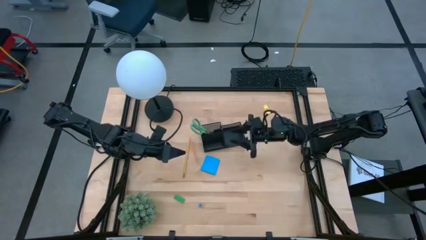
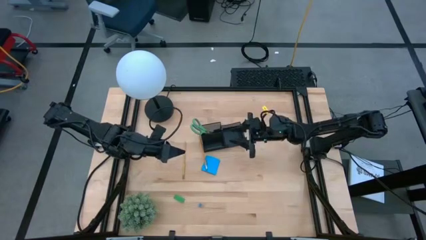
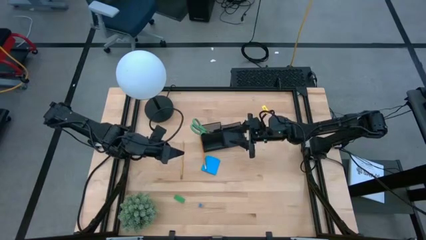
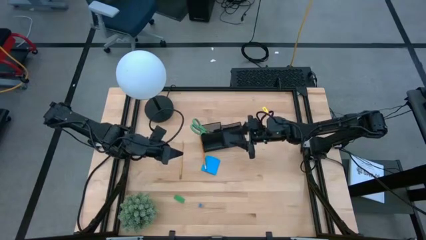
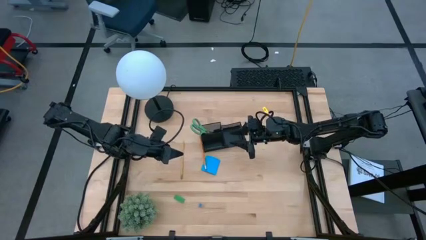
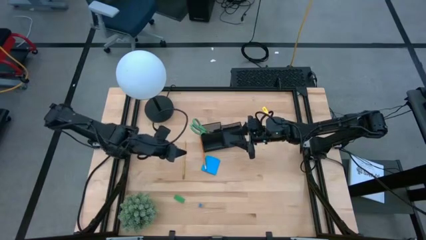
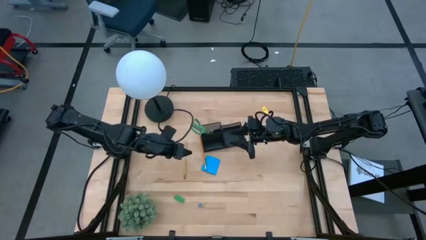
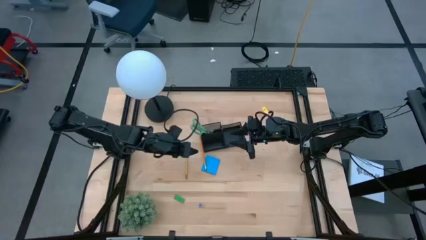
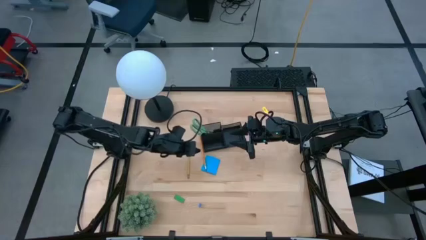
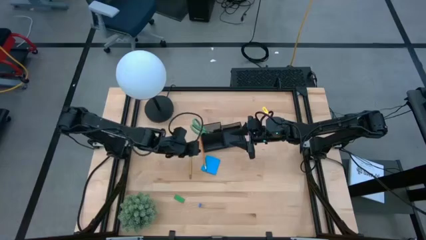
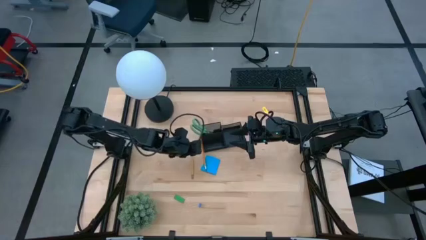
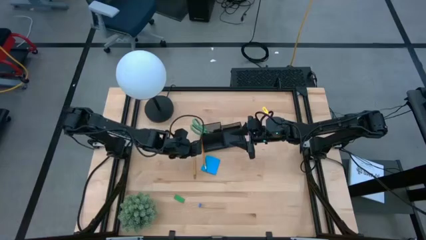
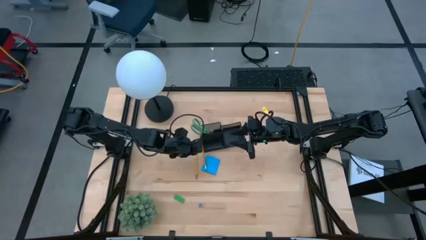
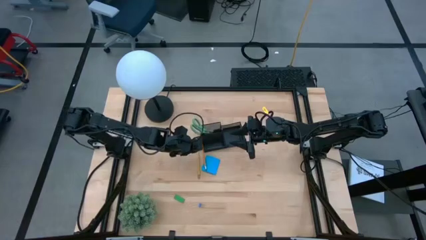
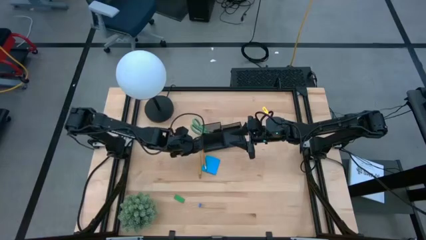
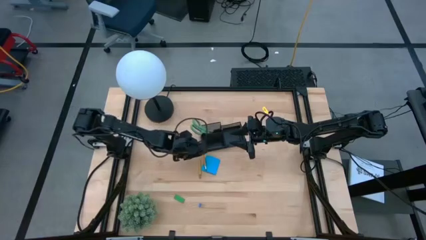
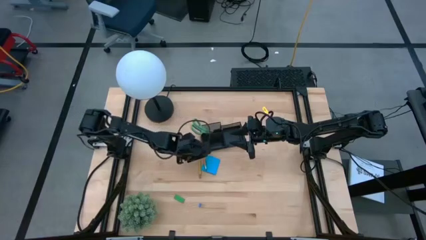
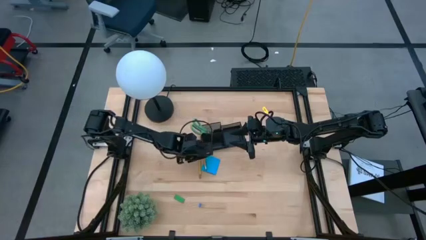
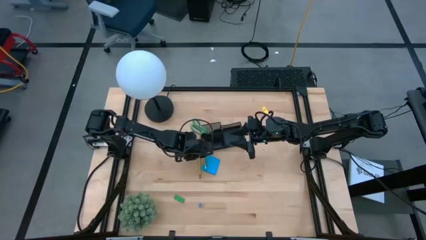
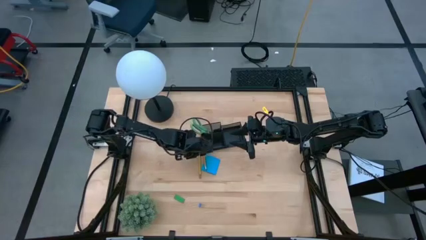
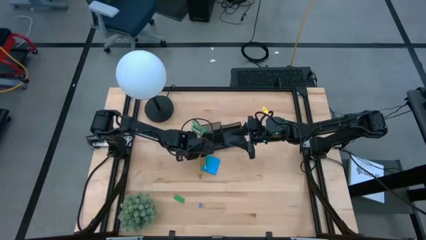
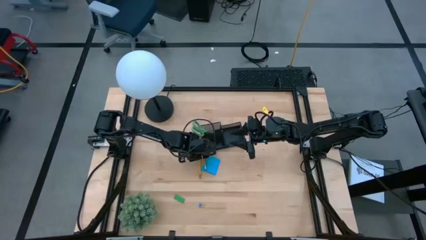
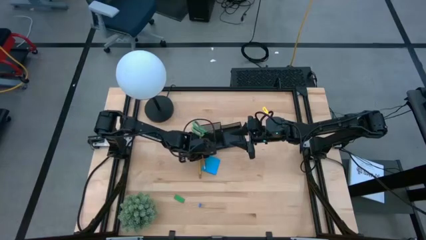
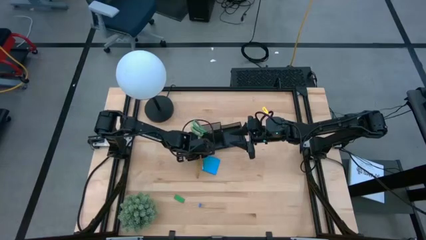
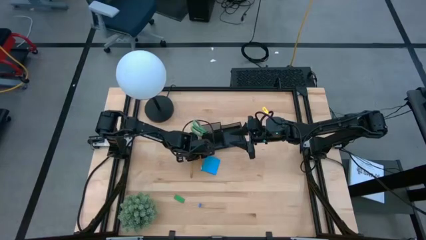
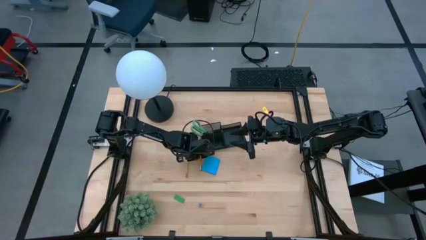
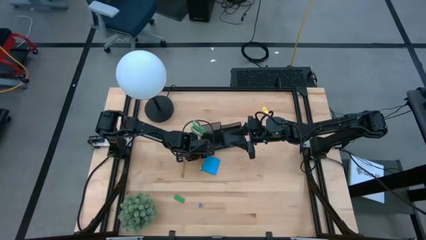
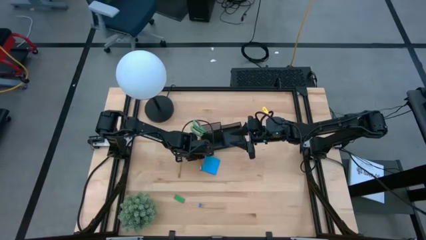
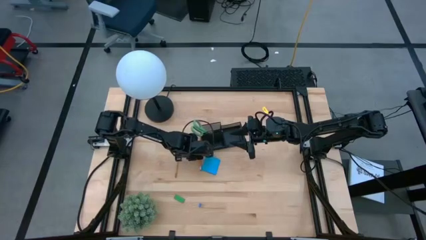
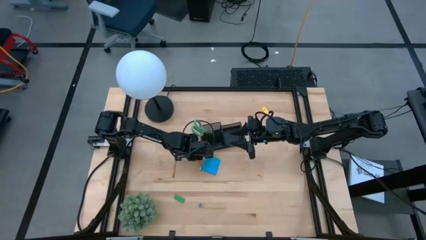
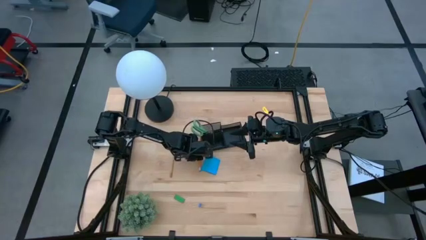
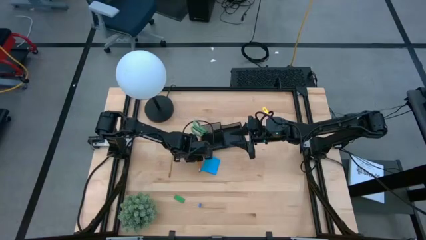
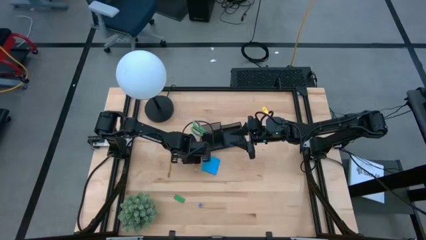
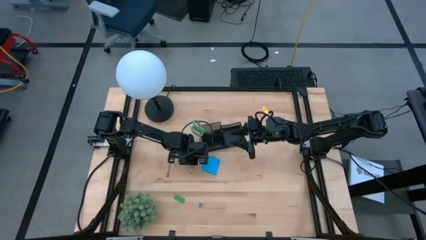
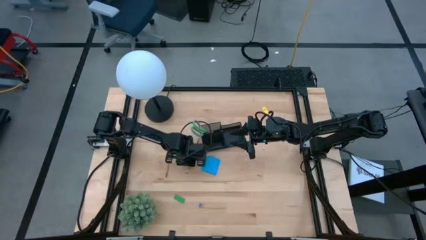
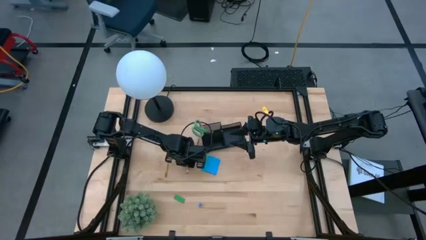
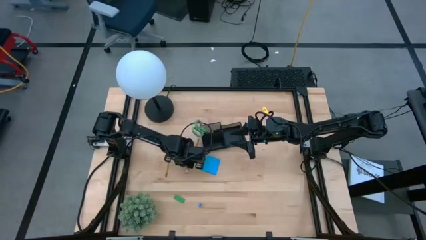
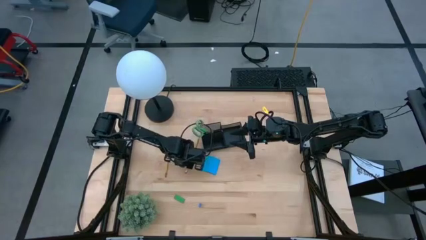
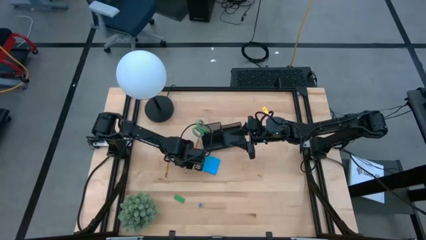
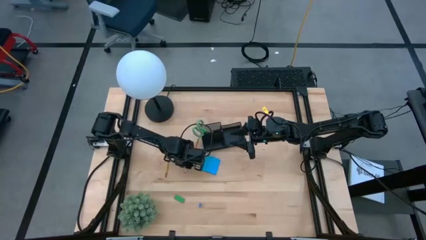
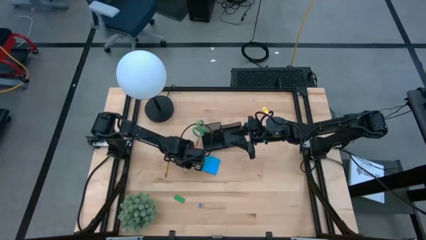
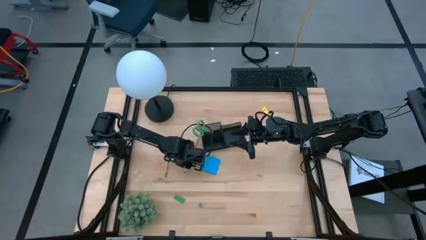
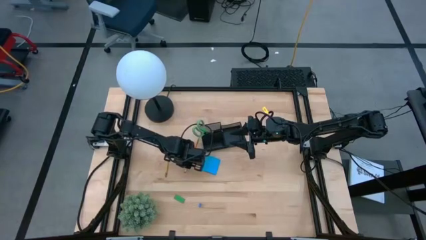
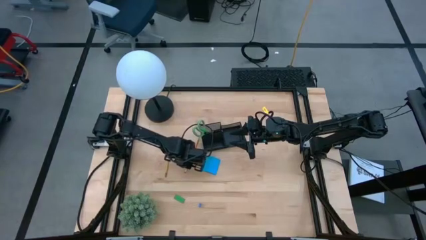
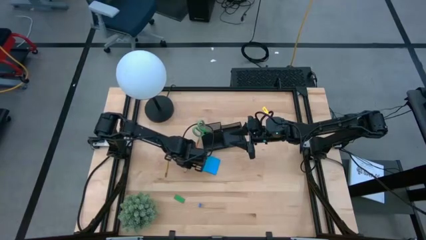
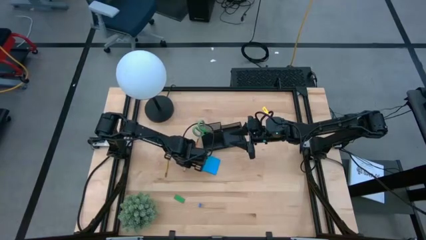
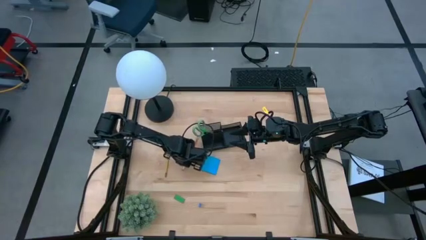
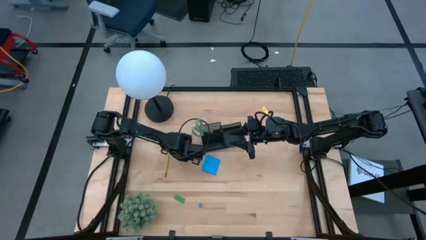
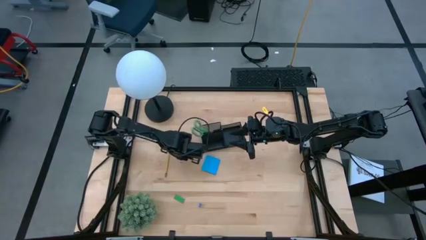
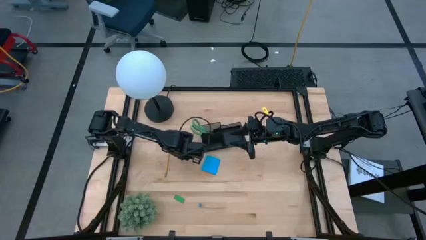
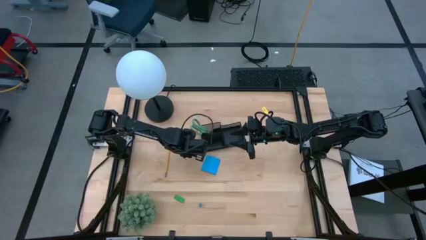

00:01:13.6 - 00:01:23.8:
Task: Pick and place office supplies into organizer
Put the orange pencil into the black desk organizer

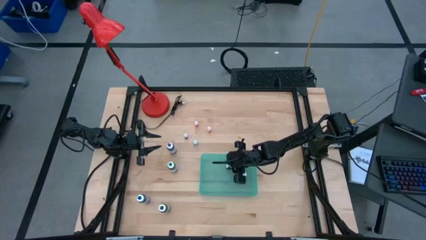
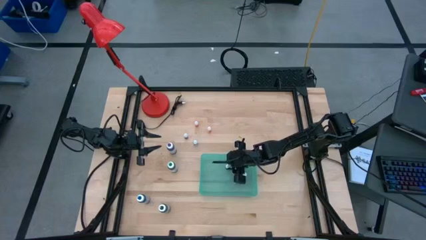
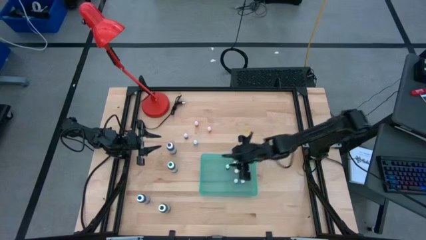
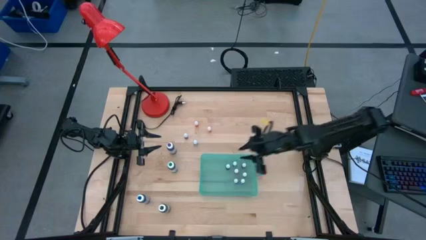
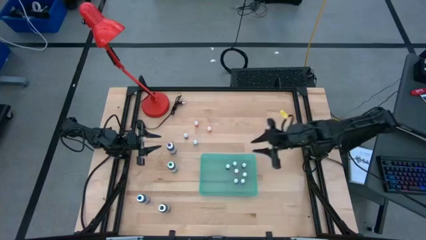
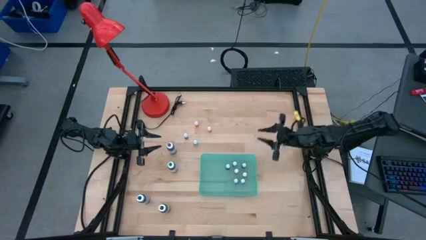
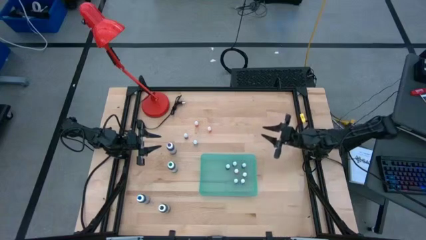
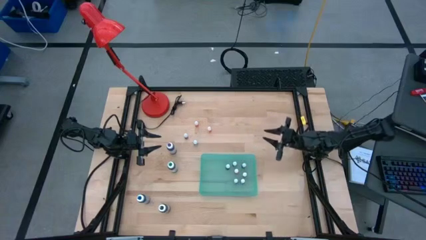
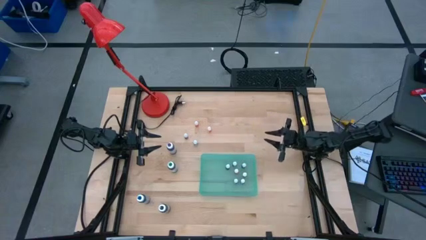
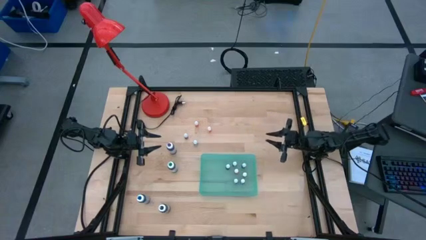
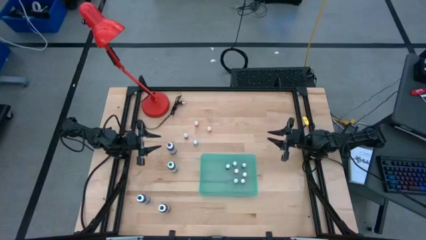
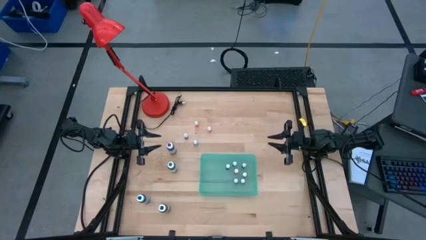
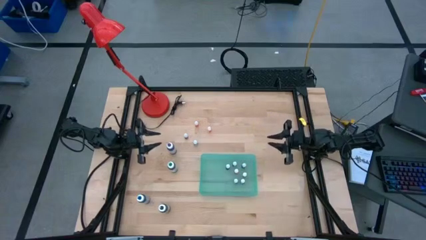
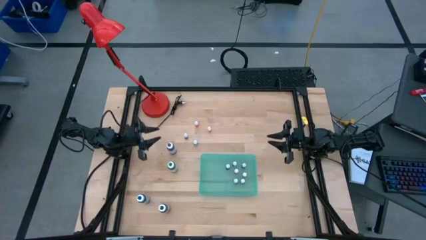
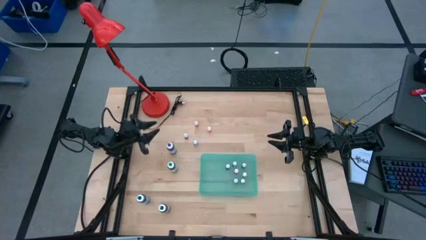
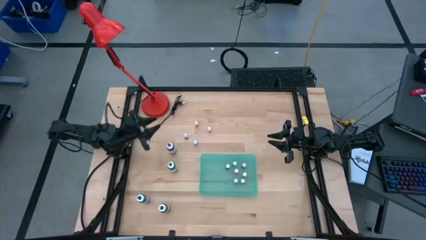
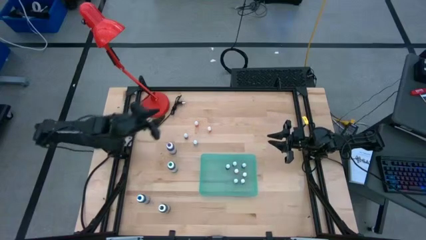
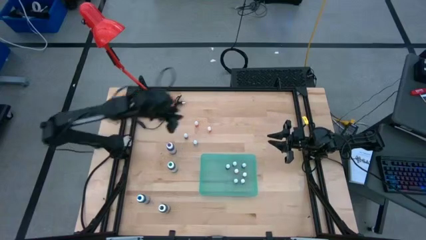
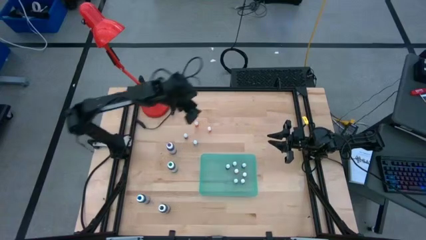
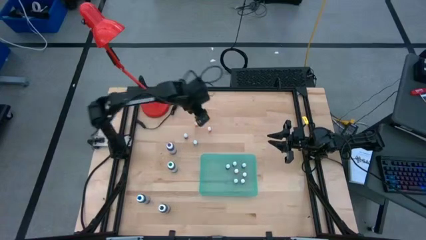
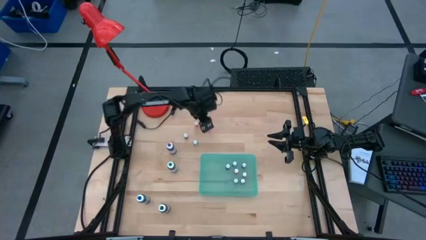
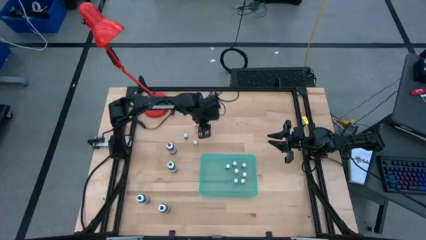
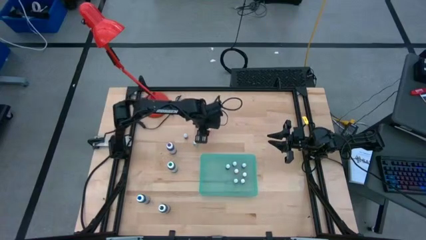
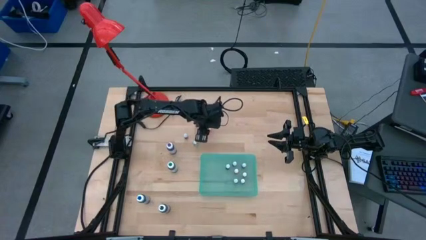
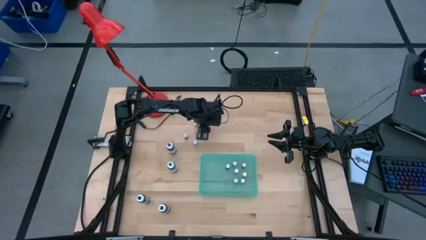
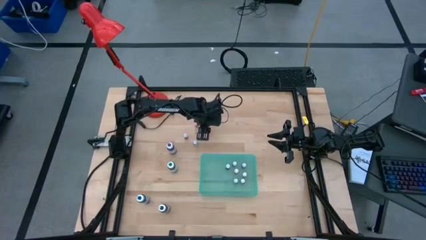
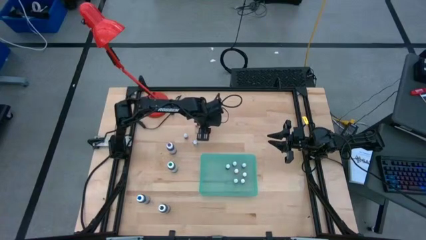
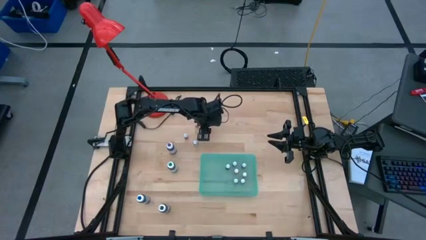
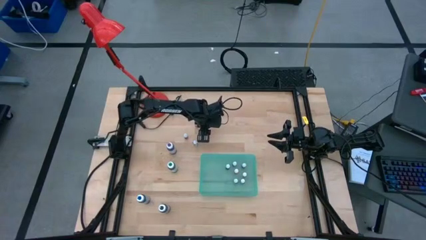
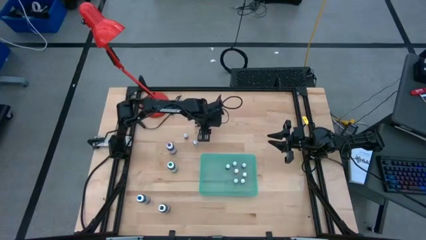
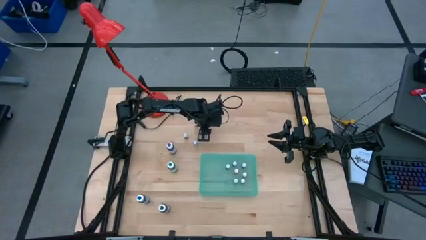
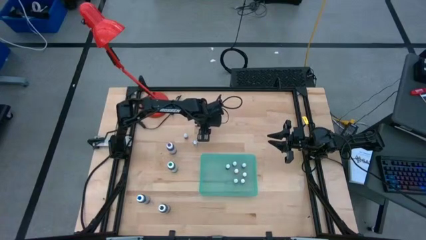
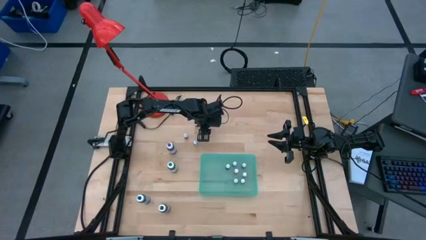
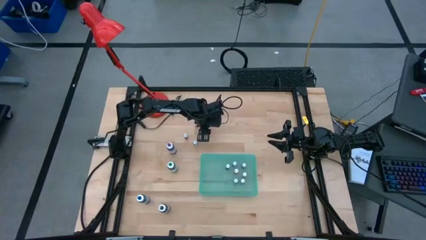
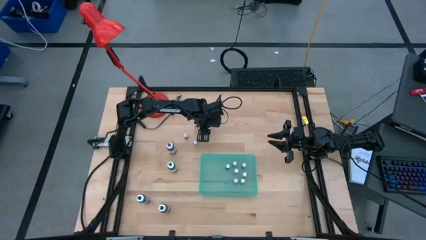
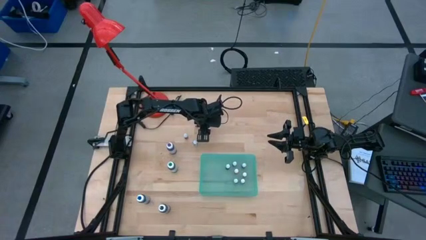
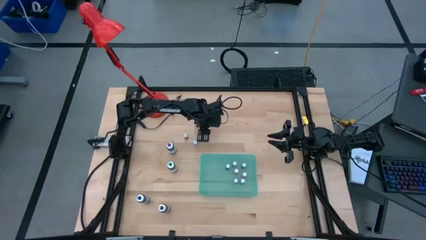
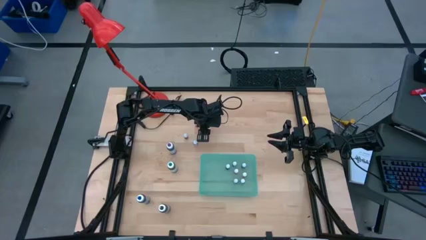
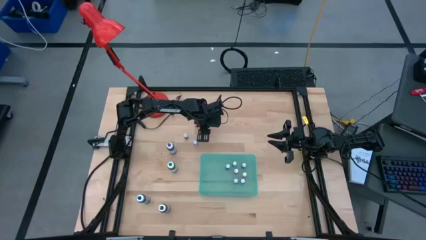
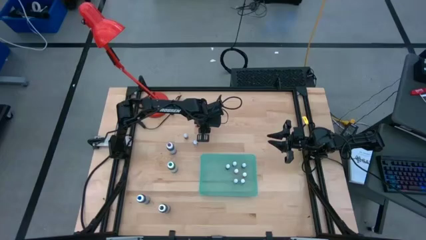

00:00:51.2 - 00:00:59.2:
Task: Pick & Place food coloring
Put the small orange food coloring bottle into the green bin
